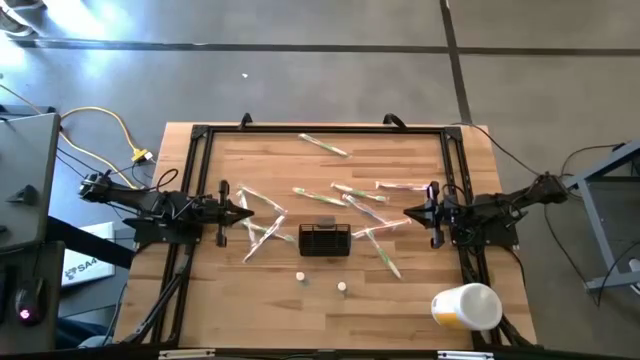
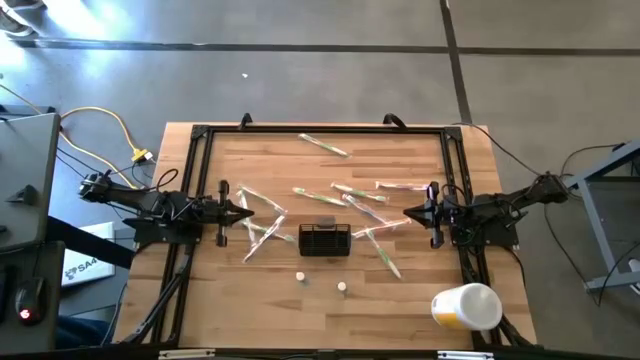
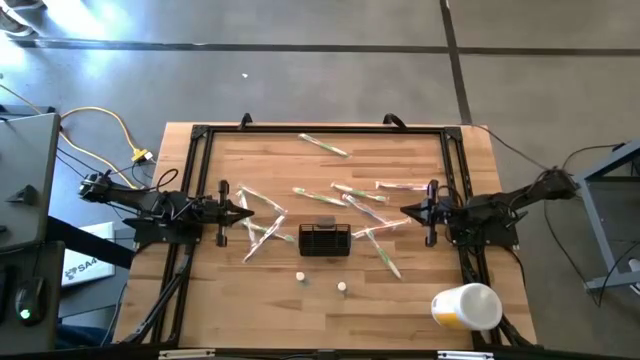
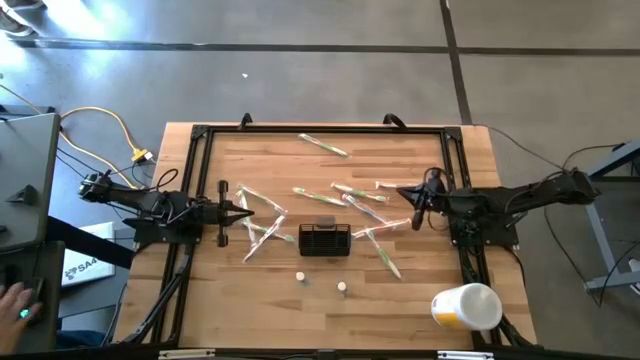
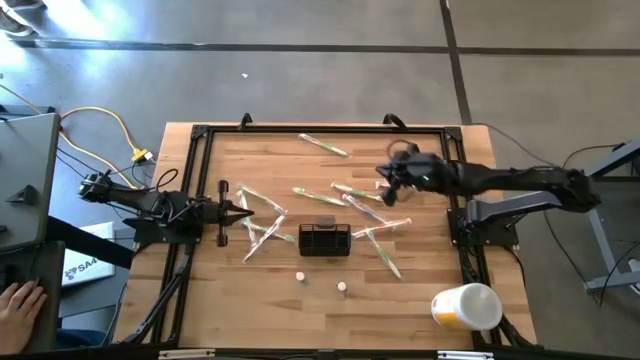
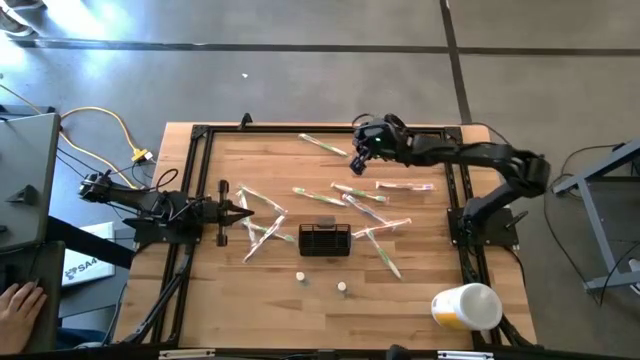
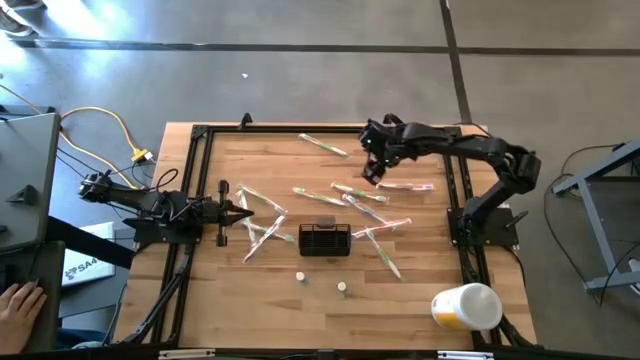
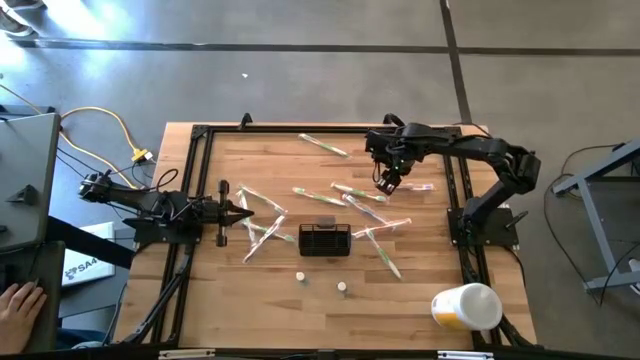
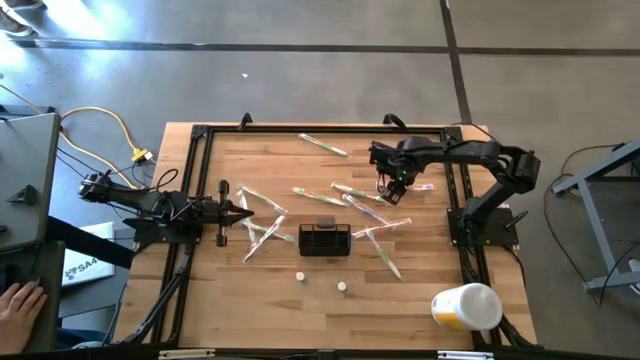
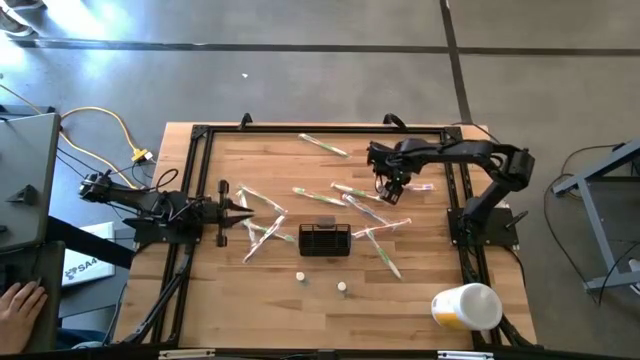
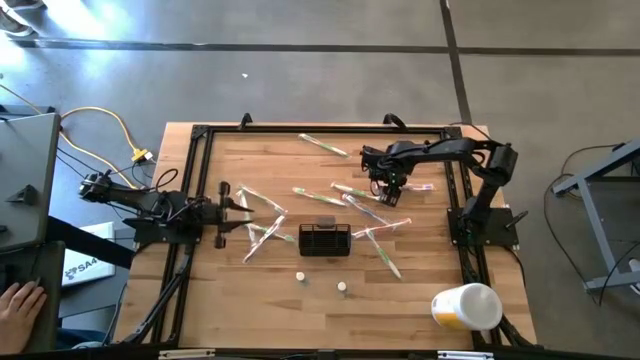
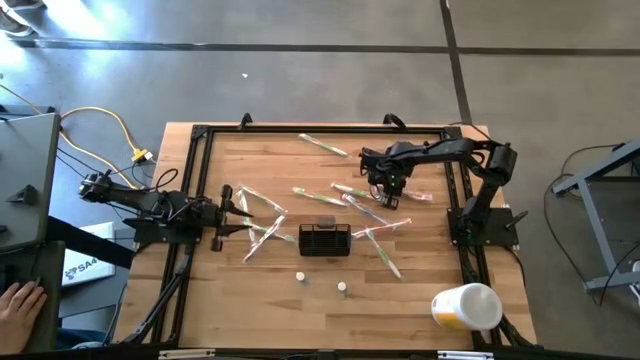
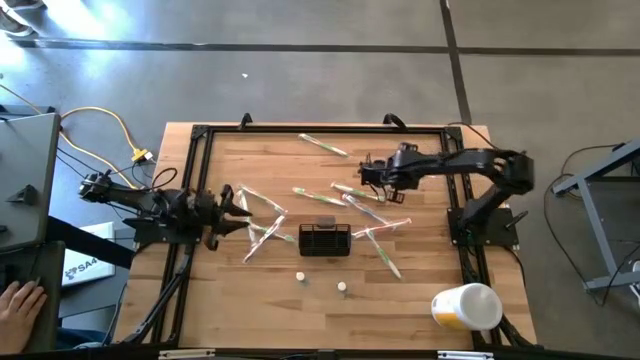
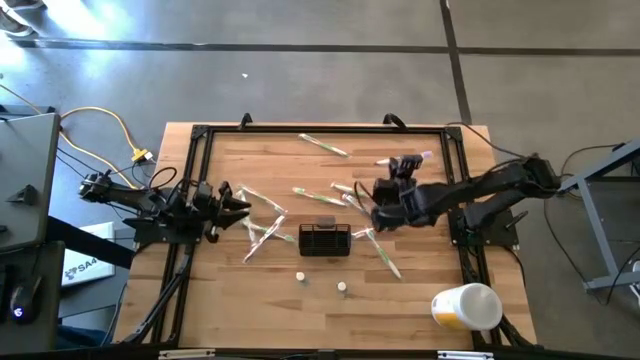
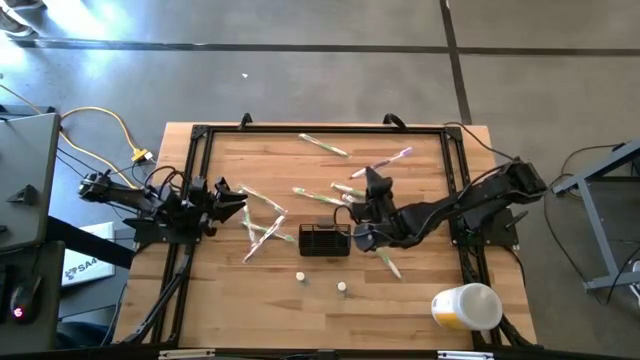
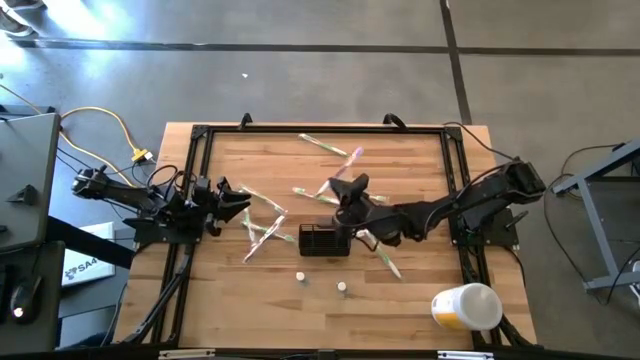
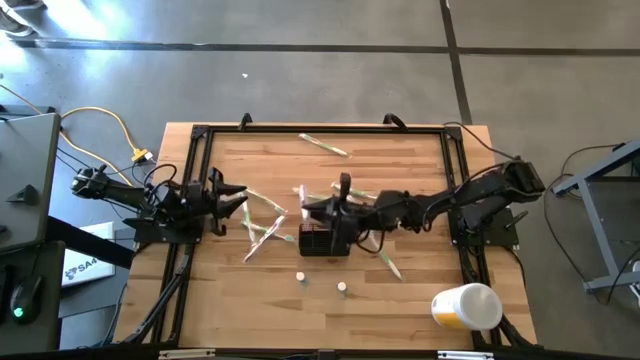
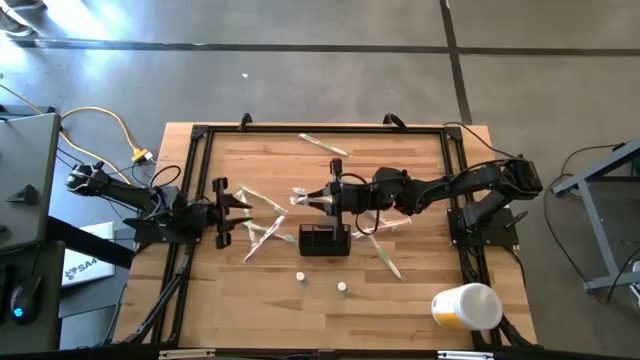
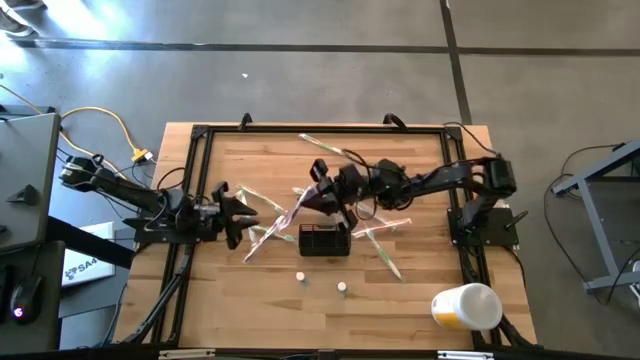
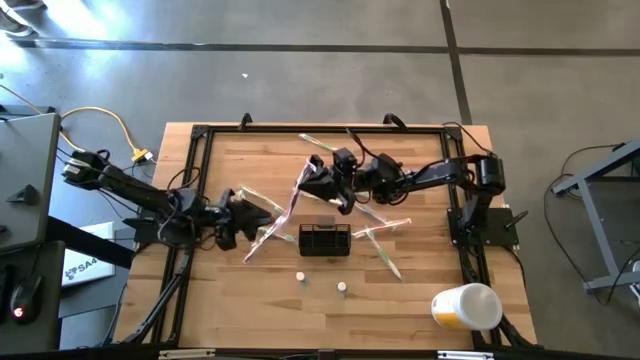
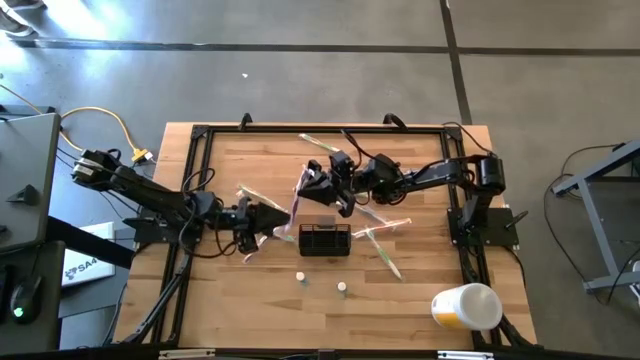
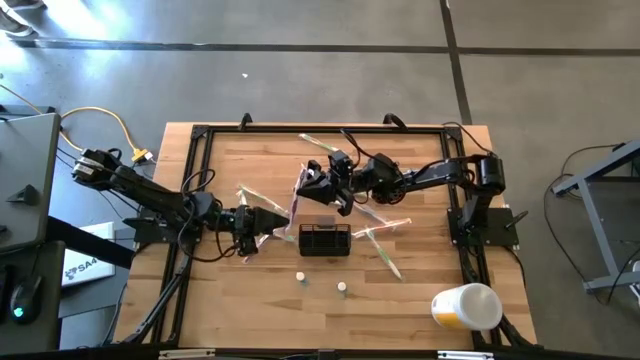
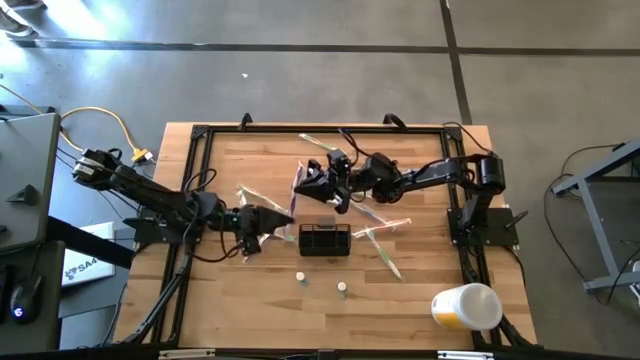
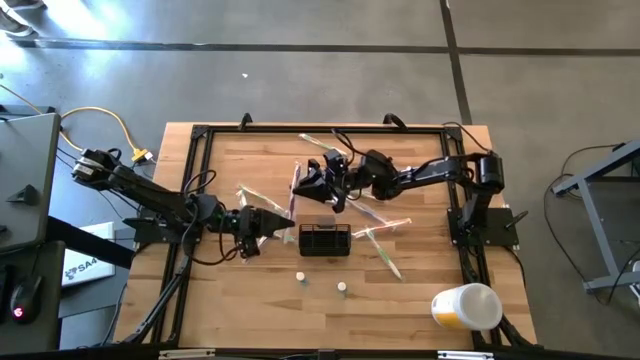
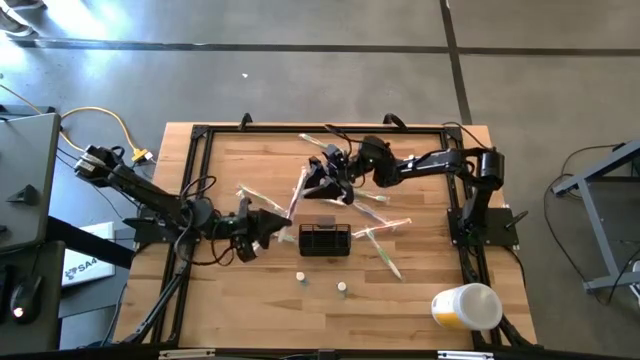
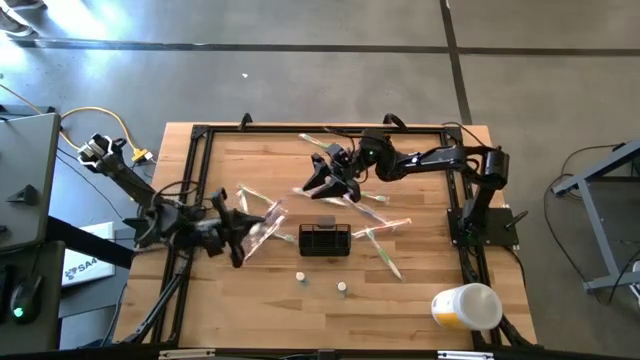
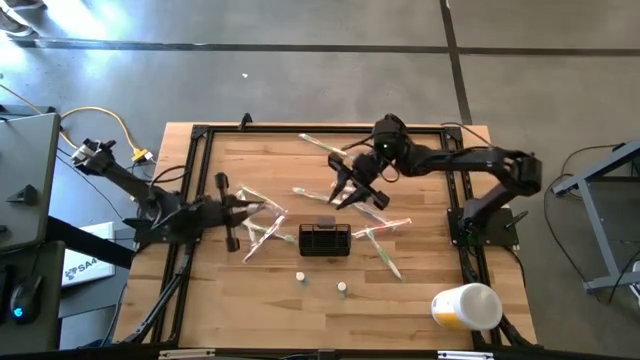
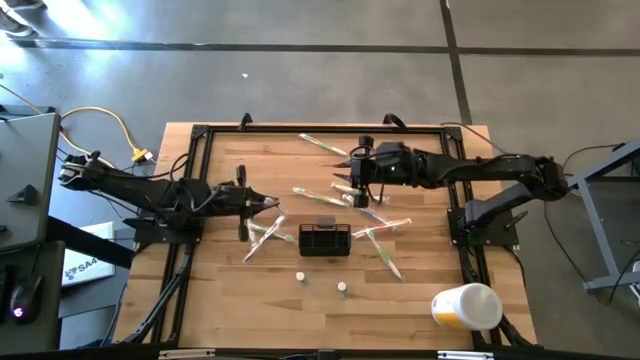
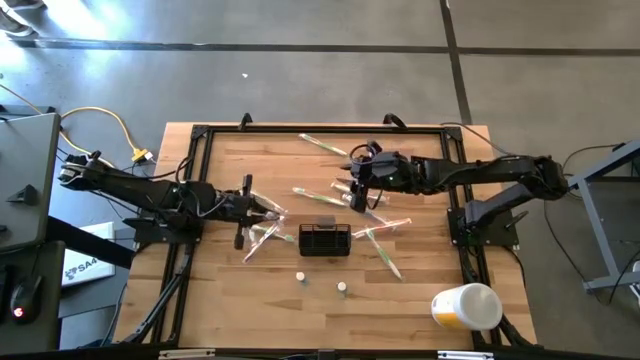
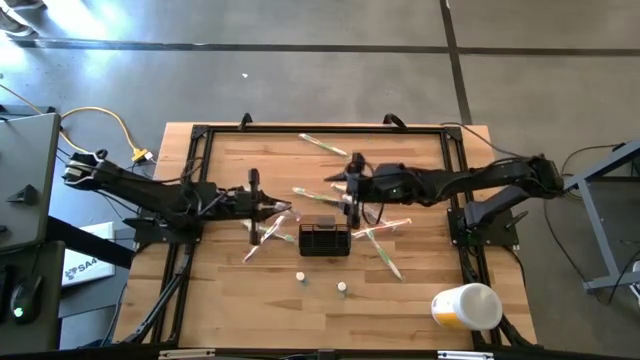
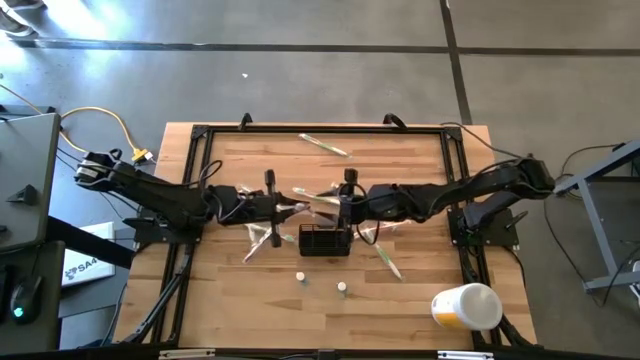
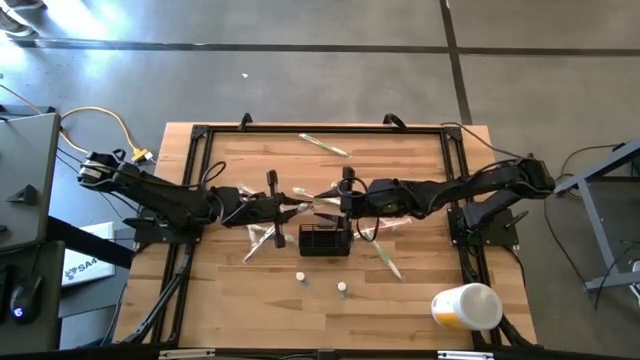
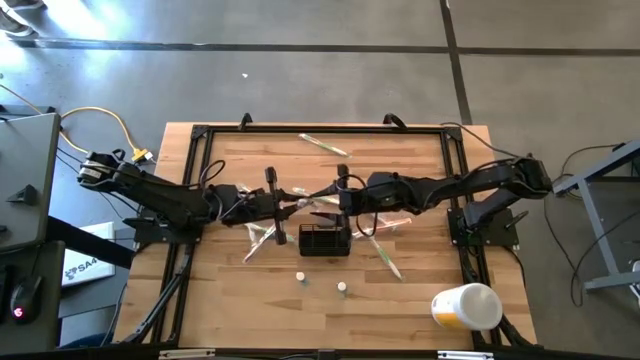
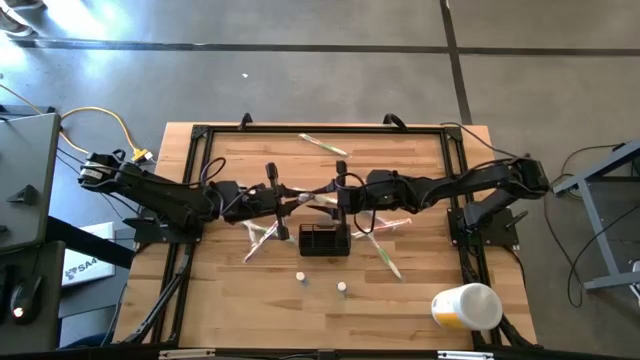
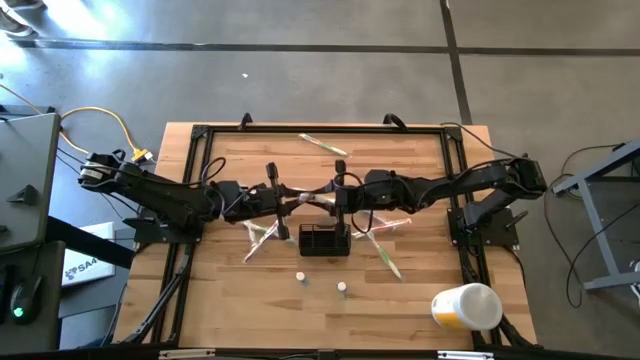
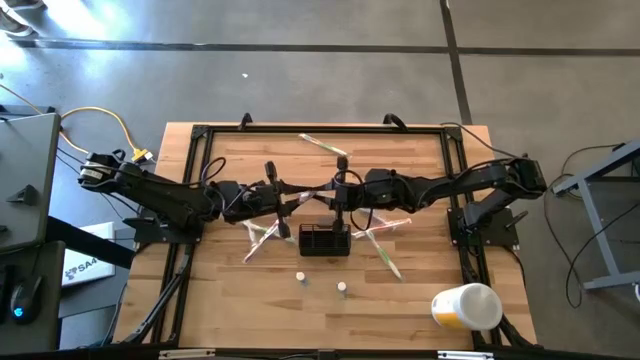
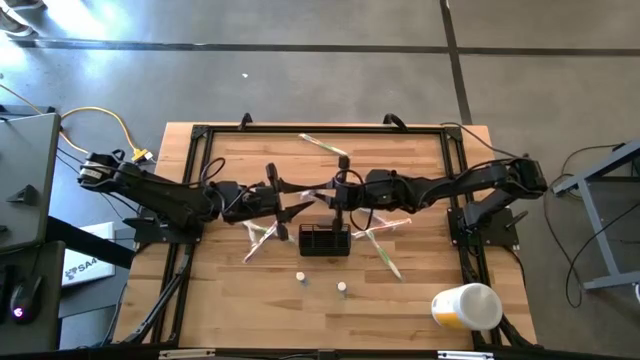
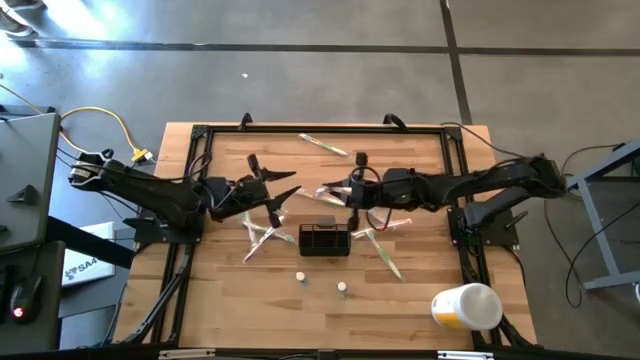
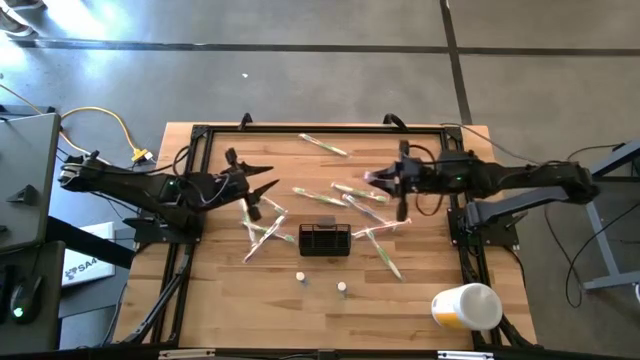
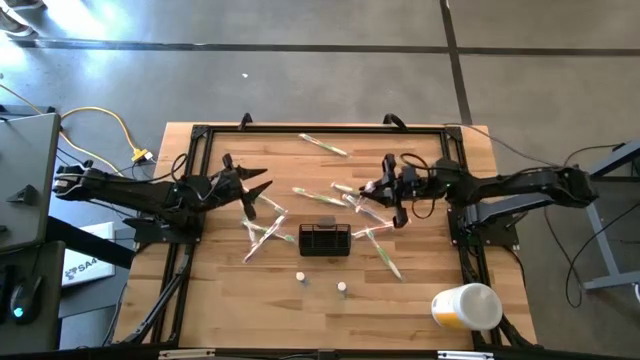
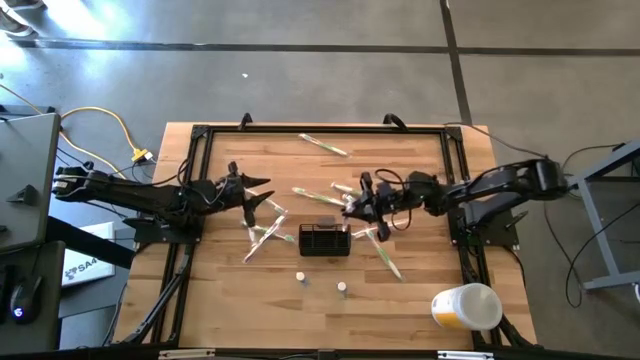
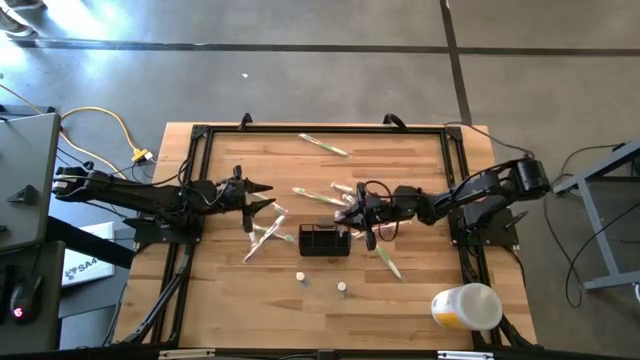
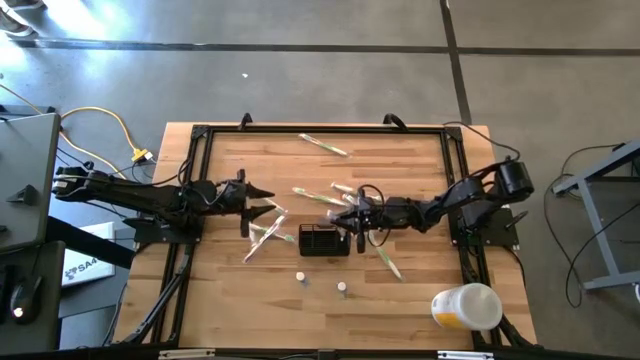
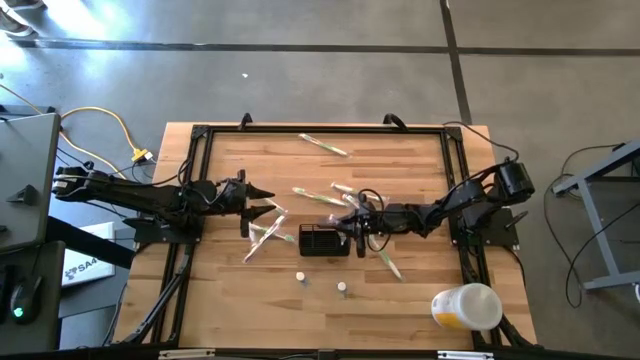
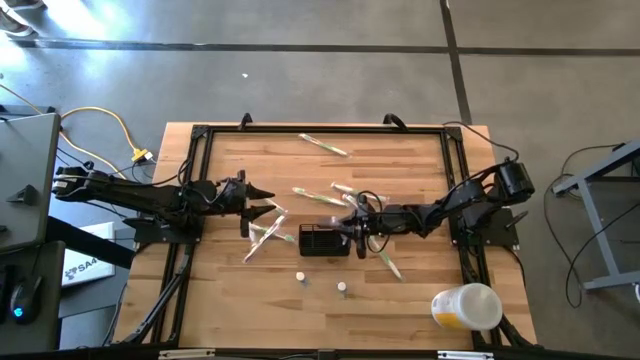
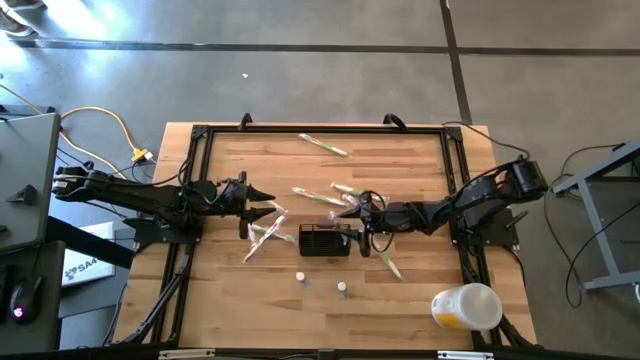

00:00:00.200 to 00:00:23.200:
Task: Pick & Place toothbrushing station
Put the violet toothbrush into the wire organizer
